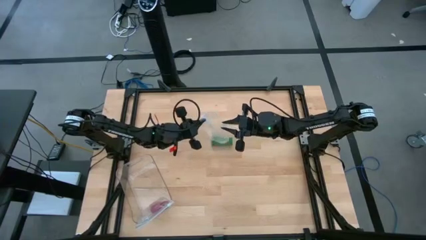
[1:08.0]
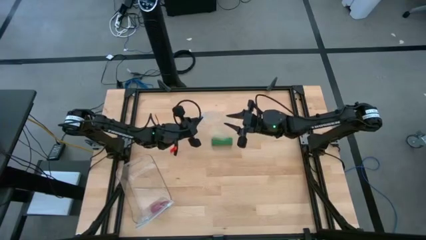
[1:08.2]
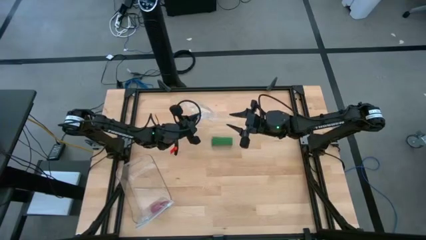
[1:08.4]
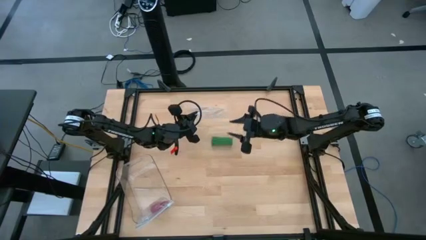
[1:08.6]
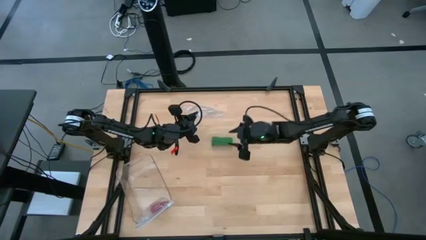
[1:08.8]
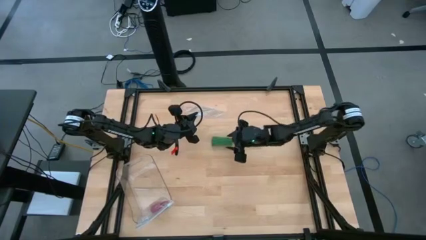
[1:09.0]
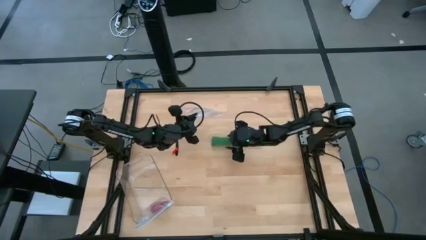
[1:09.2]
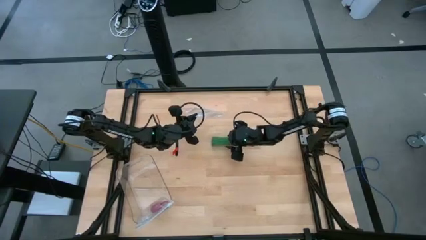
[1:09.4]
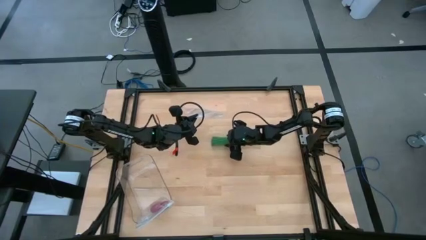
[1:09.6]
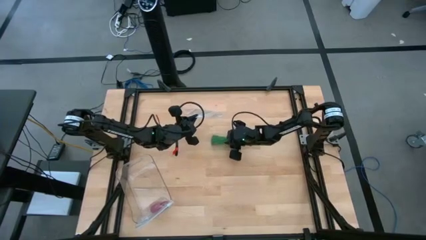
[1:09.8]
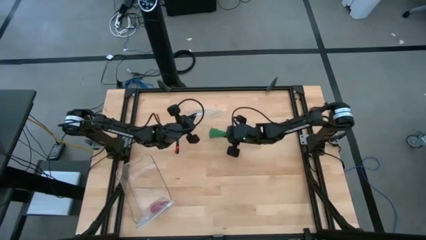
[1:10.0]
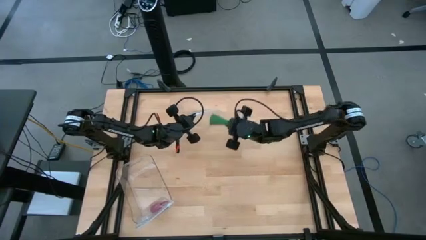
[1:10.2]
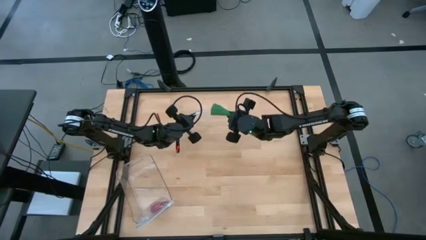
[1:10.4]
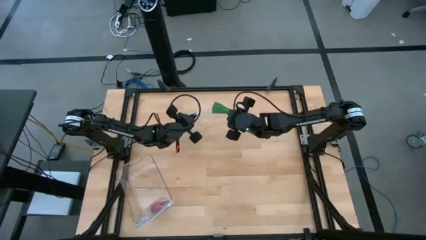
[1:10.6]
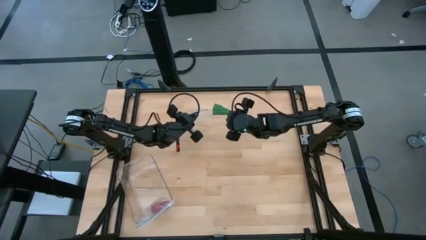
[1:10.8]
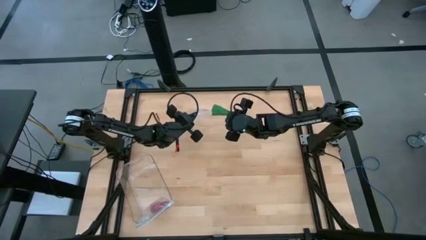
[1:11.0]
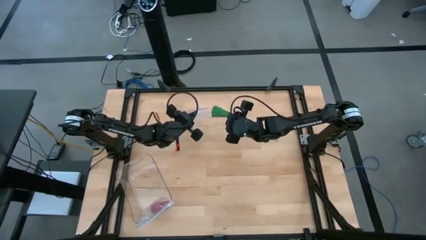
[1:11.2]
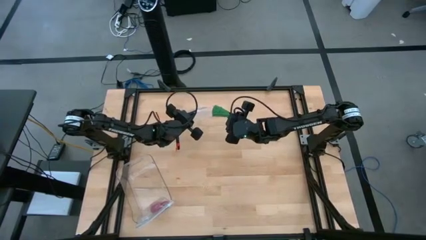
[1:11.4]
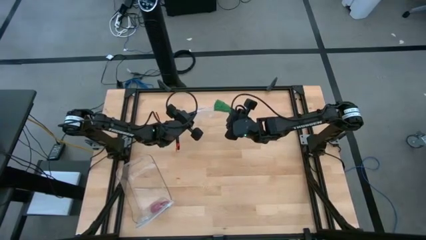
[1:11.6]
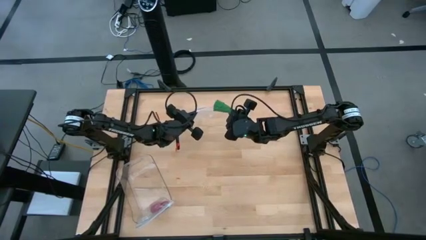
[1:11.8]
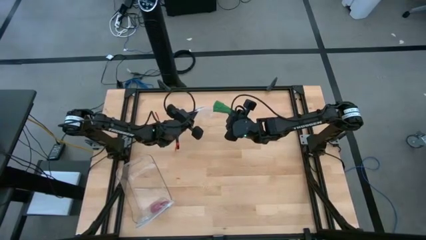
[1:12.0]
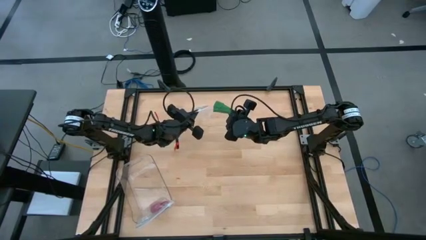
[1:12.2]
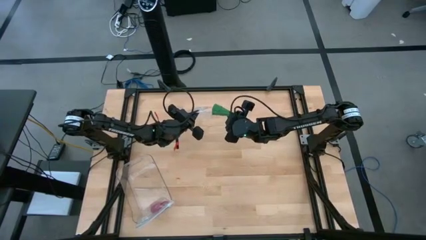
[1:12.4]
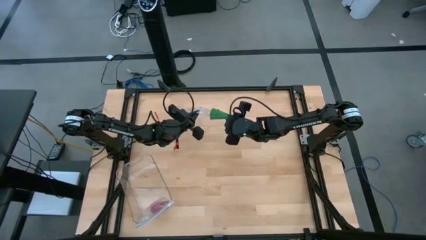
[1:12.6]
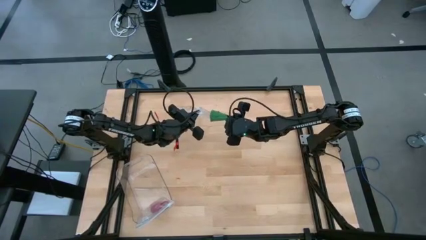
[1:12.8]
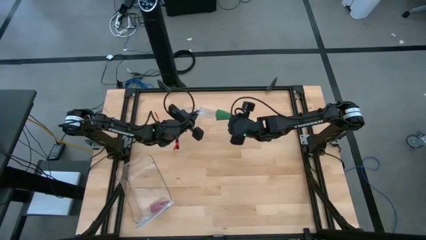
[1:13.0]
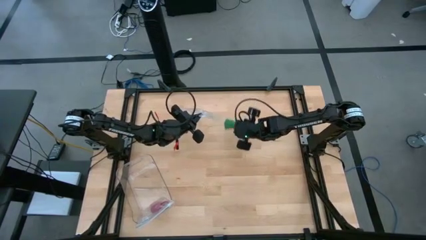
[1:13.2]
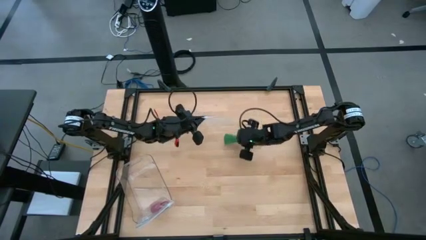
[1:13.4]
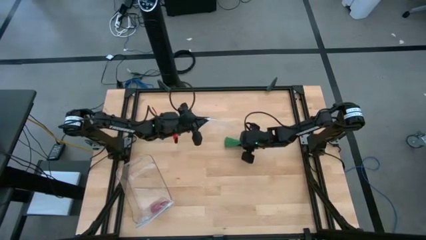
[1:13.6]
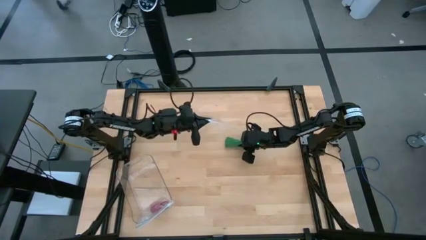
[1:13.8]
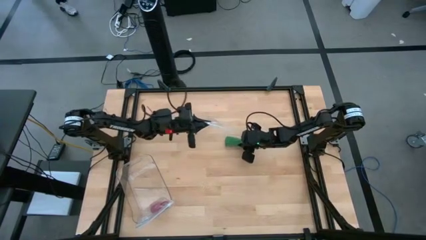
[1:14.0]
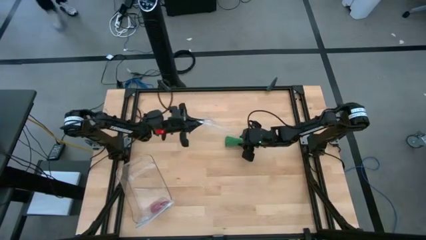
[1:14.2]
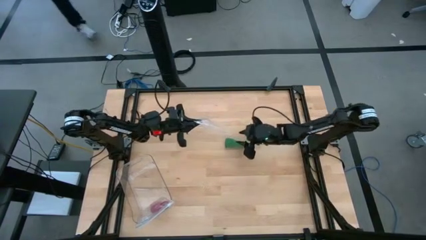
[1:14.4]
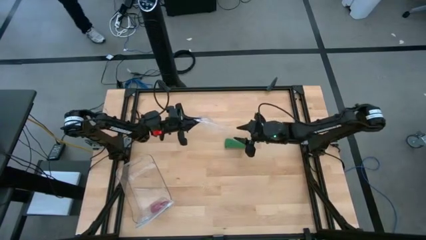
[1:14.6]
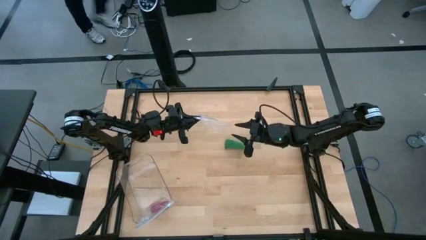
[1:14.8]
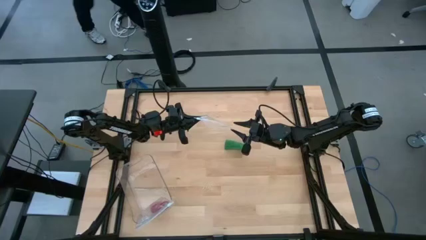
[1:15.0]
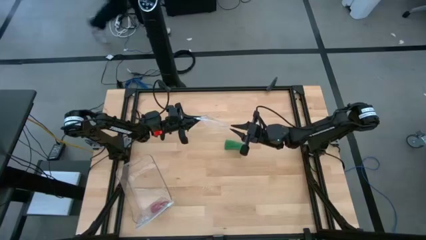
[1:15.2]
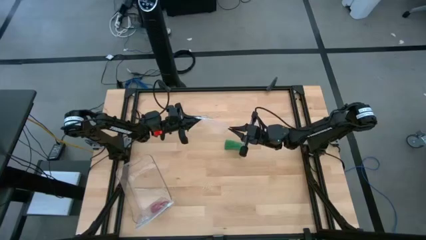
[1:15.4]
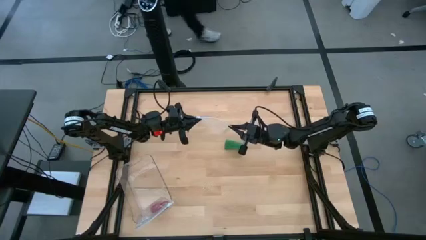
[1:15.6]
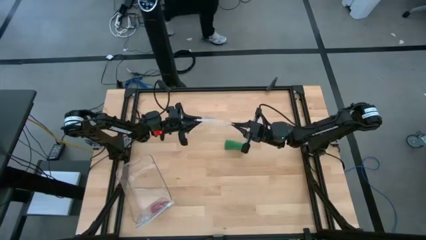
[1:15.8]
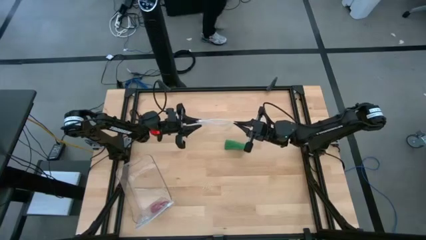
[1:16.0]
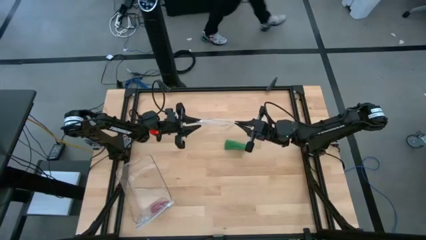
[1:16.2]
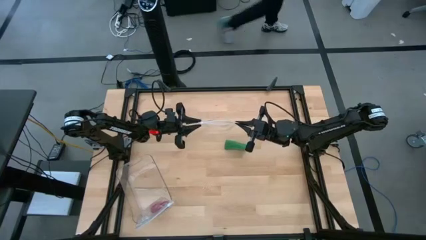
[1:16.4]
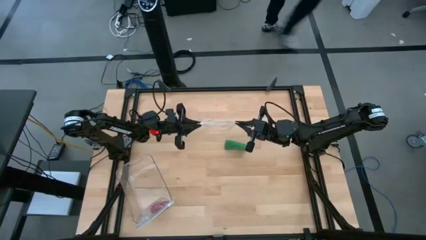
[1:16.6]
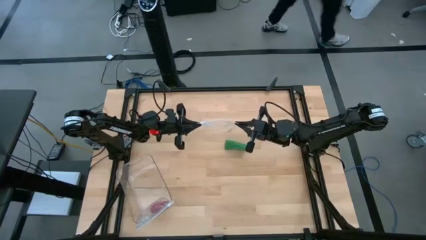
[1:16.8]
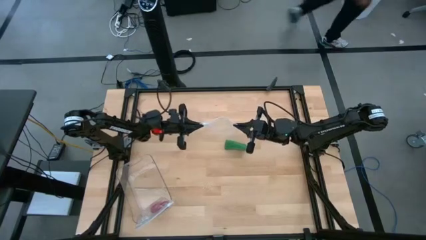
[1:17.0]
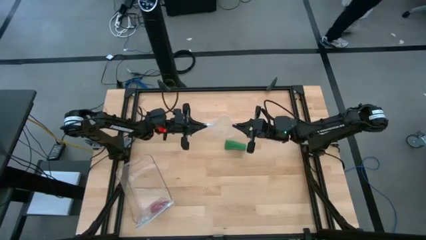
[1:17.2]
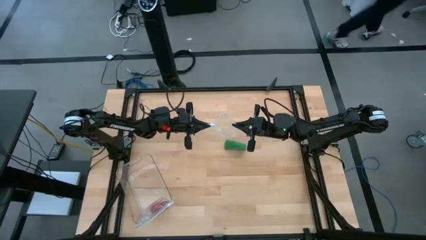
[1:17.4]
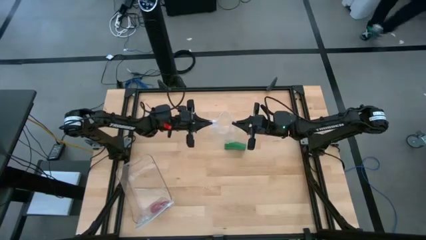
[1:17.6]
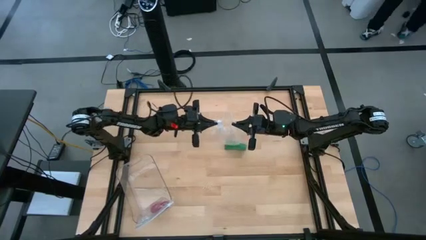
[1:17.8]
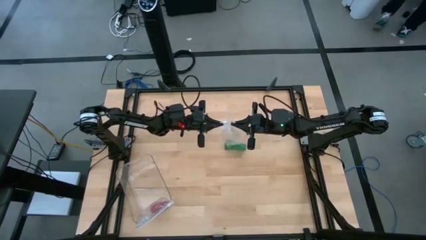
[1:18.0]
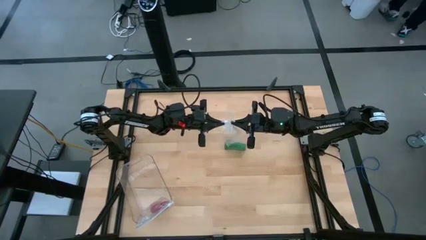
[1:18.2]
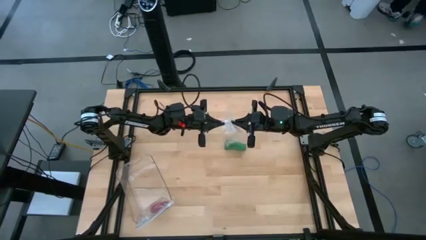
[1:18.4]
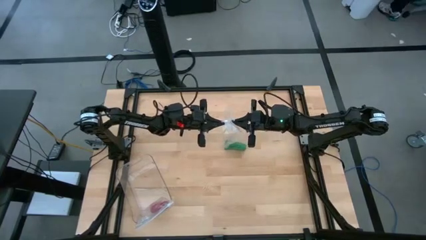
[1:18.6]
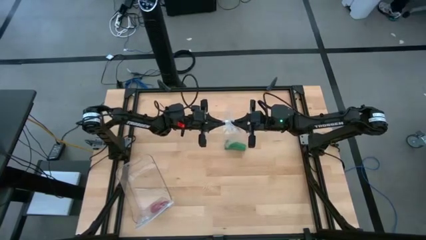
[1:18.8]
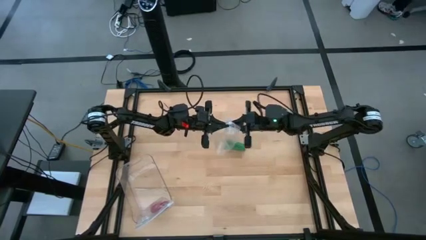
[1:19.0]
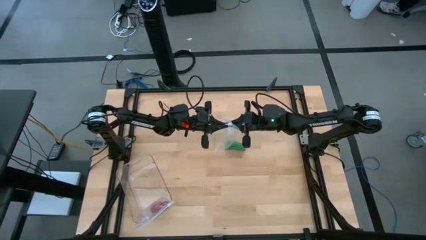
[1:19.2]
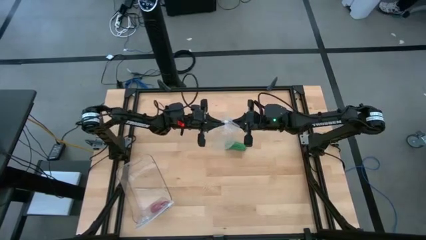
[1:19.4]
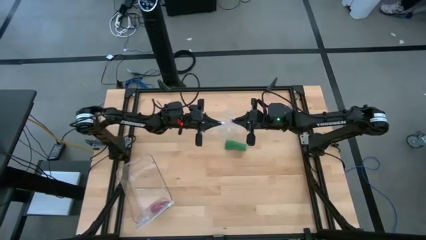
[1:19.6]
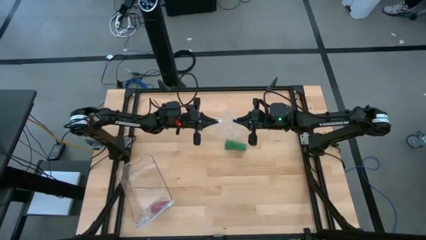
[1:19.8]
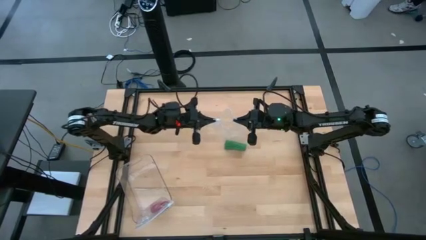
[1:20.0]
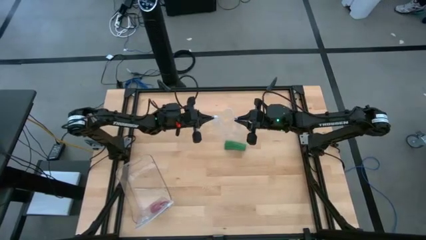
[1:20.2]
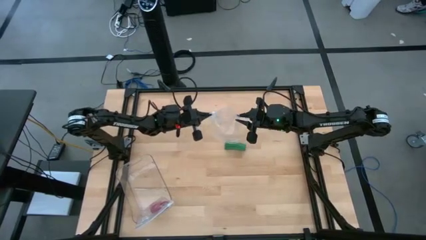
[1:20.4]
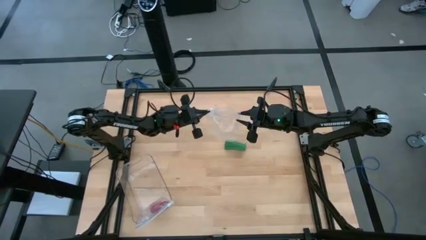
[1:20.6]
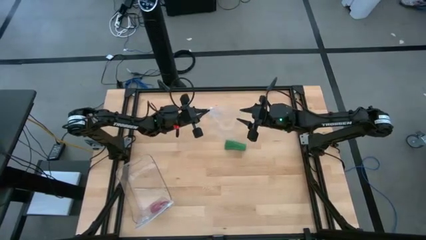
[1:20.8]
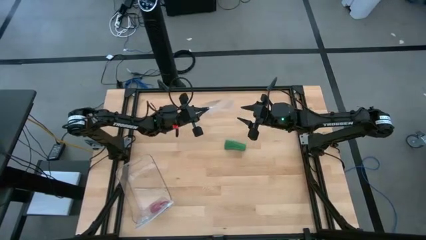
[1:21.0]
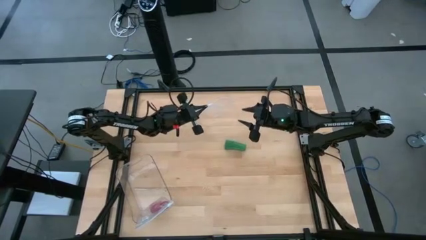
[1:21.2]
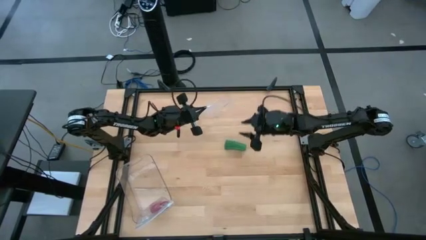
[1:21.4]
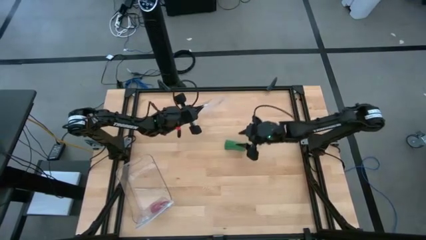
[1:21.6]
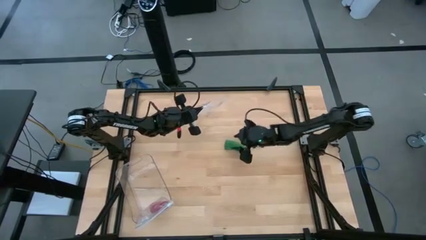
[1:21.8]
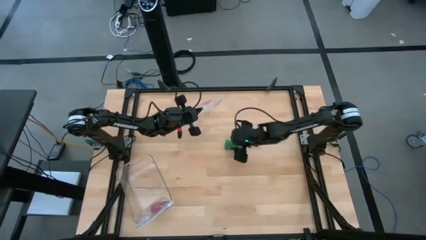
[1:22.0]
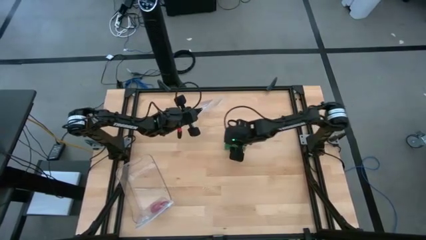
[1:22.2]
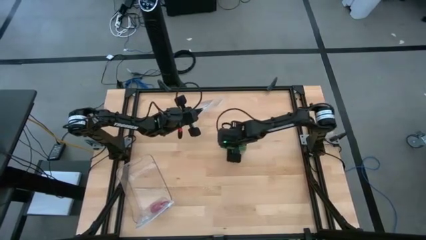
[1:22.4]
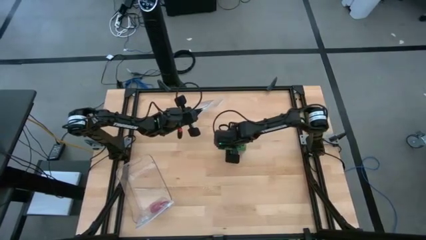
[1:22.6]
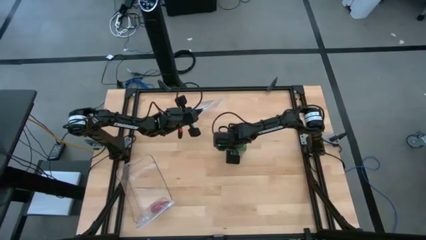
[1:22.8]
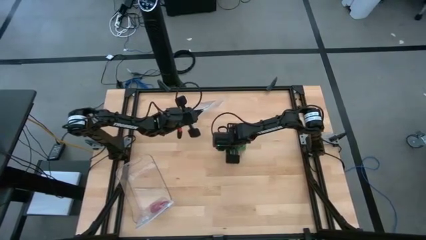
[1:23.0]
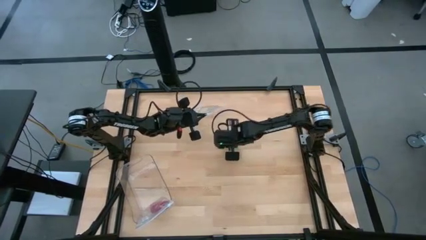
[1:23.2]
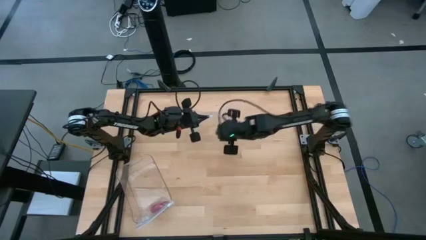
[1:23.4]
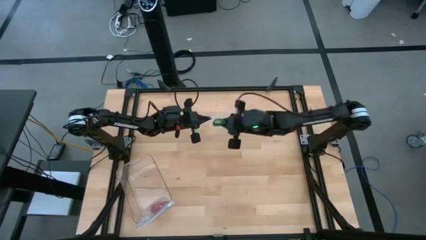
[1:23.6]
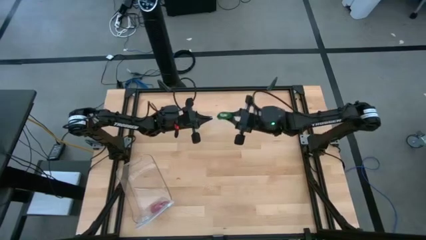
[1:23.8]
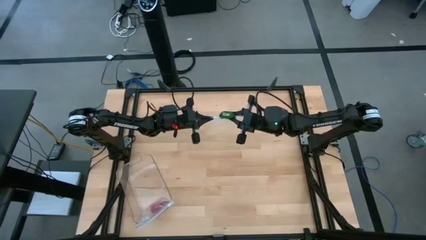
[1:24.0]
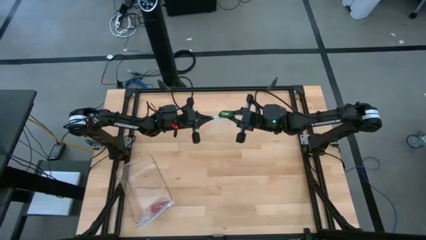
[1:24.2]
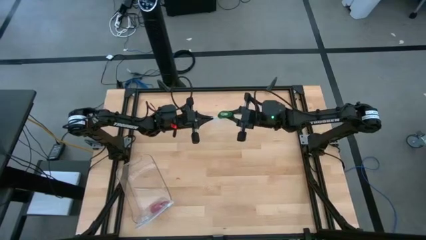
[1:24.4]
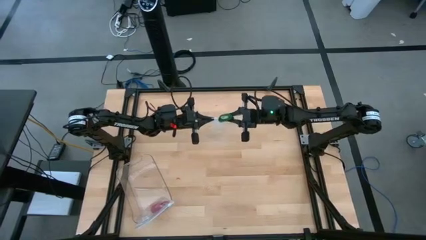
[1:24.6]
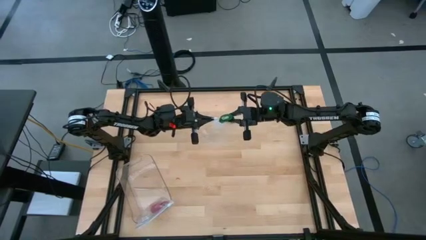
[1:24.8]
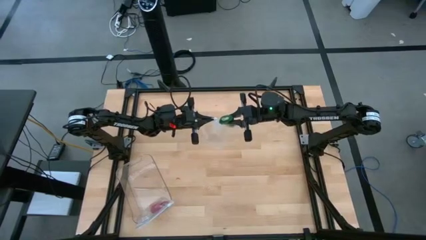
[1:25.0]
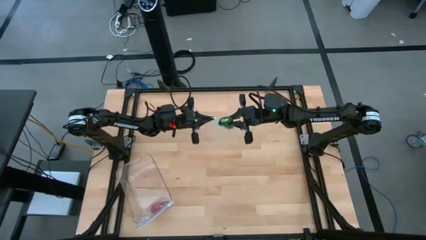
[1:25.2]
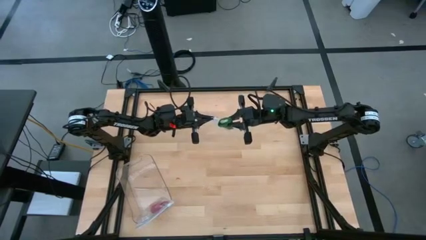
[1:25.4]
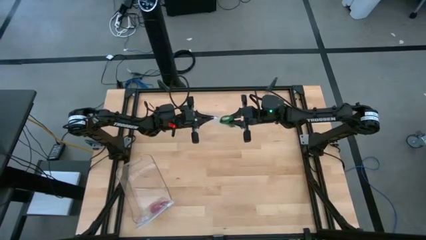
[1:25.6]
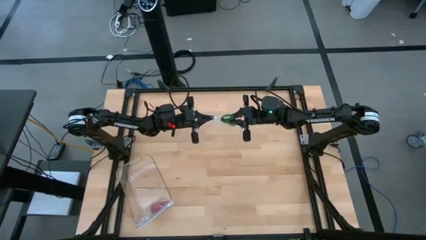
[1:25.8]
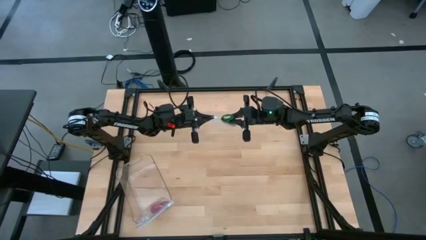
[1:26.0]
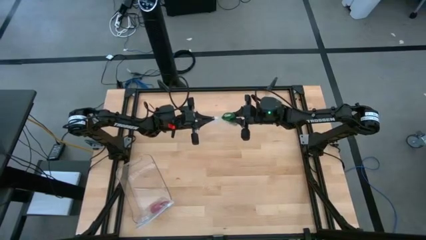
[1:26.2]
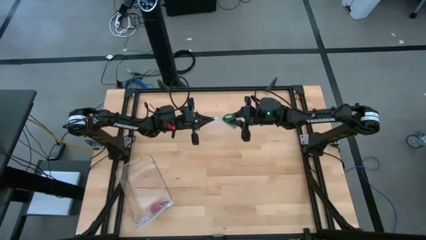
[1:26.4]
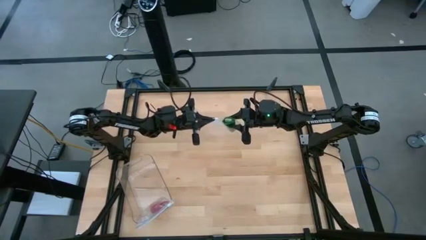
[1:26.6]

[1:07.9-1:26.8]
Task: Roll bandage
Put the green bandage into the transparent zip bag
